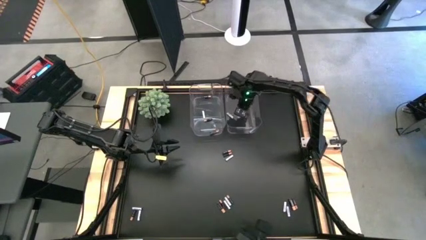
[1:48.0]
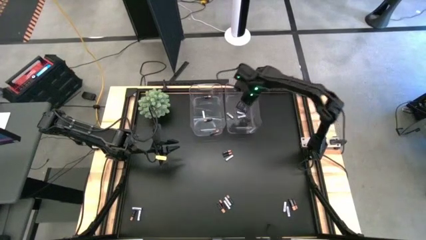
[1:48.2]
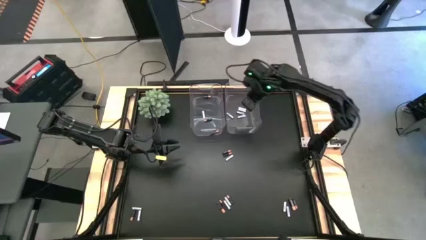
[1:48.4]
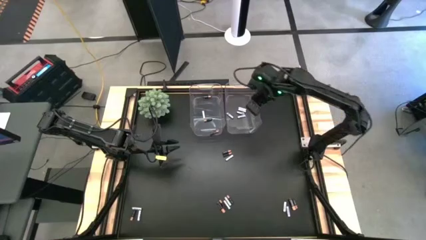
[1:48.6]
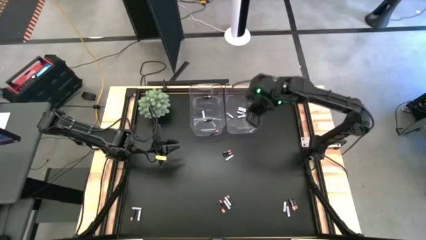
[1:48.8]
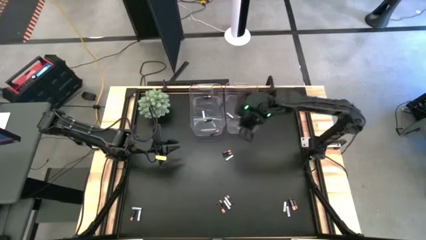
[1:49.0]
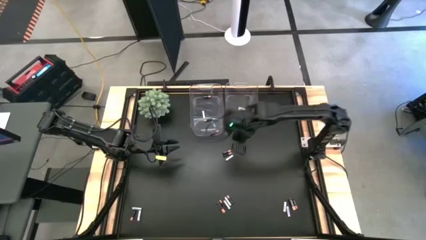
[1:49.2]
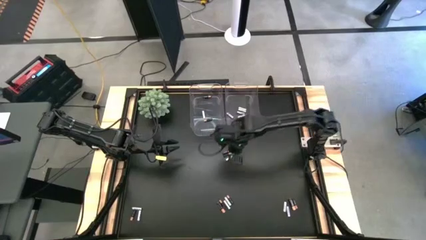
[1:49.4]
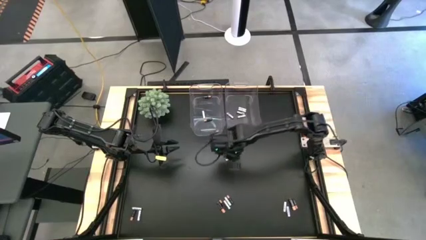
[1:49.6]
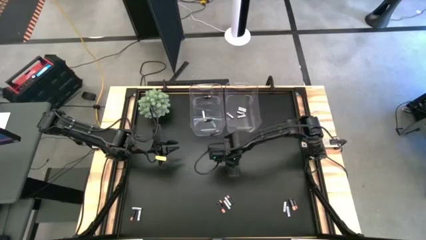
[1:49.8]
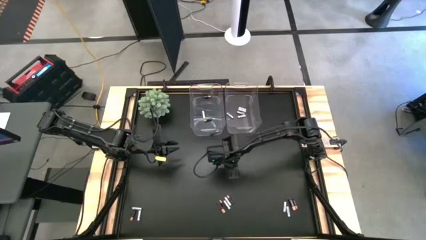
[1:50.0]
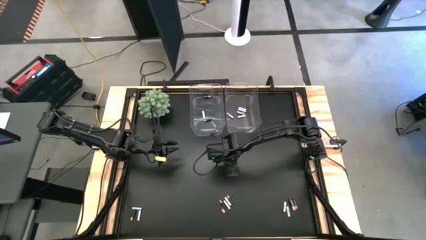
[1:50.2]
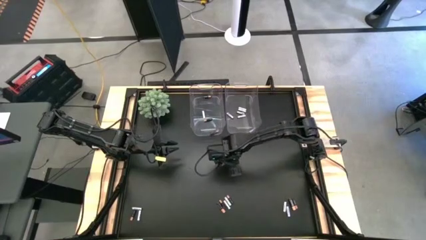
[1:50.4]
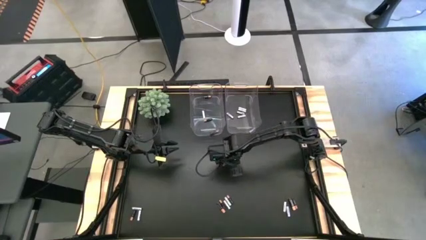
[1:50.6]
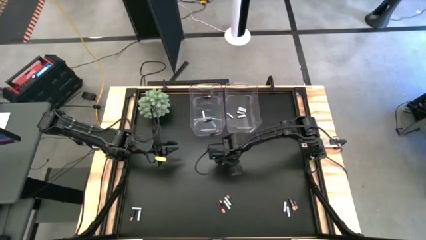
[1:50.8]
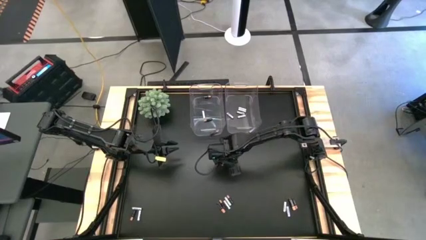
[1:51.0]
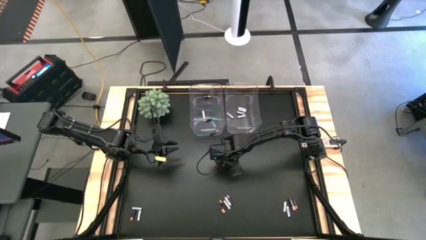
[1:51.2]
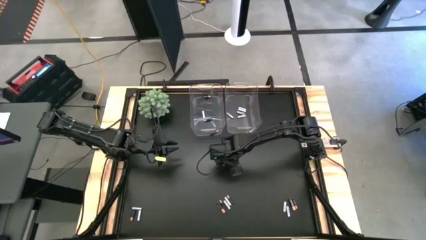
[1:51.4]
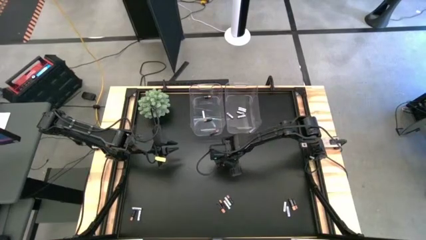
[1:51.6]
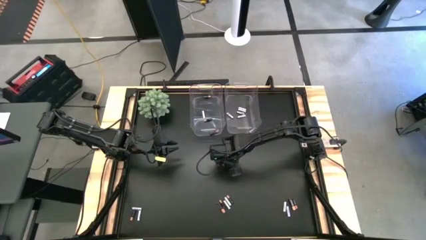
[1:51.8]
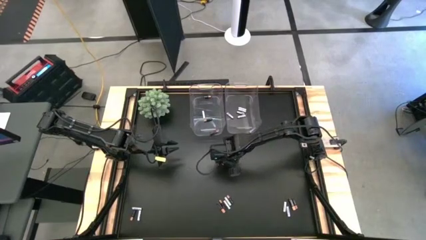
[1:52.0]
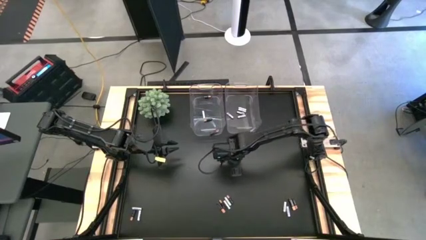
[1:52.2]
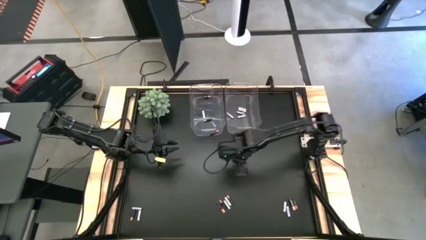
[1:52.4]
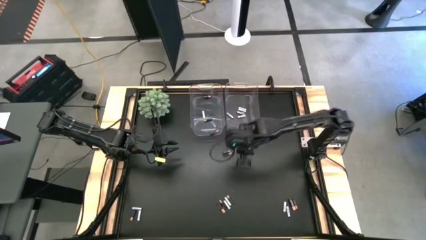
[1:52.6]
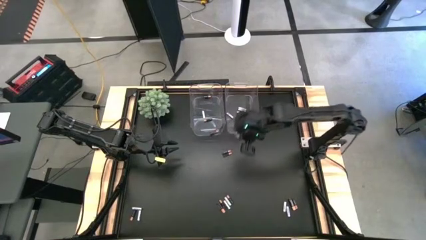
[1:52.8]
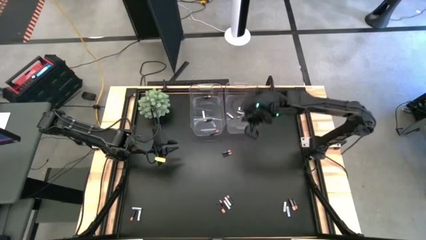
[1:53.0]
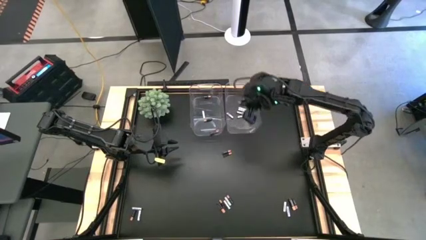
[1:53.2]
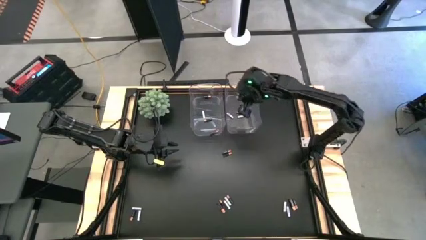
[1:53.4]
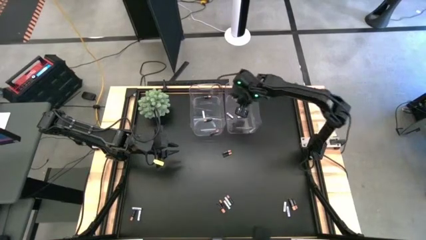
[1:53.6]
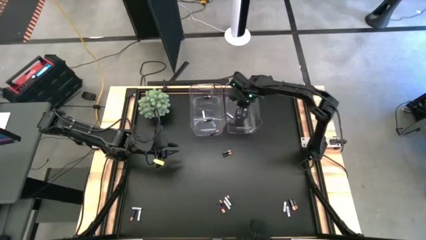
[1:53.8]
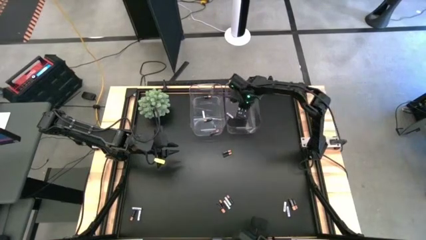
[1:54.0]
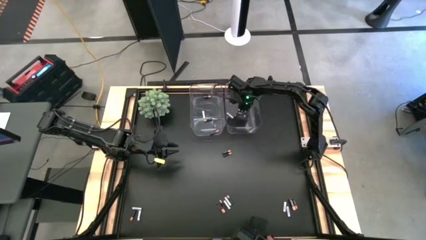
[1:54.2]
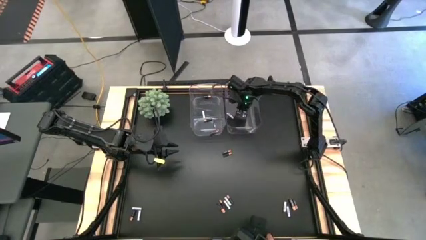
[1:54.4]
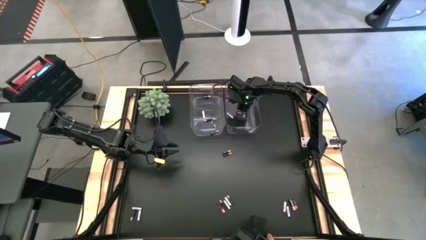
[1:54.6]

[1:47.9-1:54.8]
Task: Sort batteries
Put the white battery into the right transparent bin

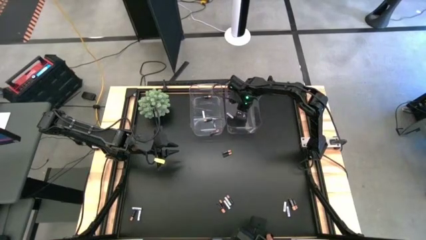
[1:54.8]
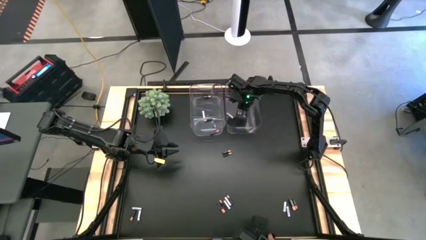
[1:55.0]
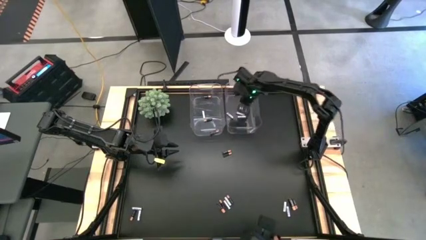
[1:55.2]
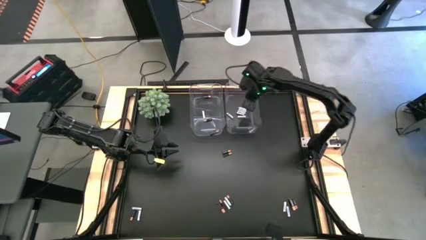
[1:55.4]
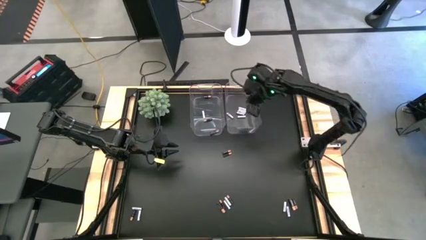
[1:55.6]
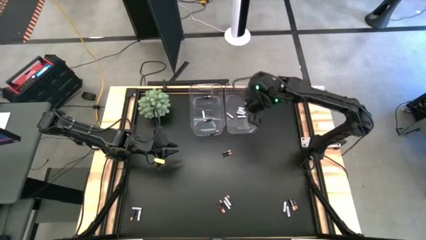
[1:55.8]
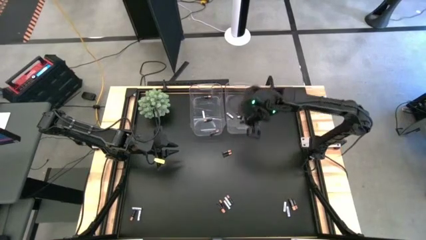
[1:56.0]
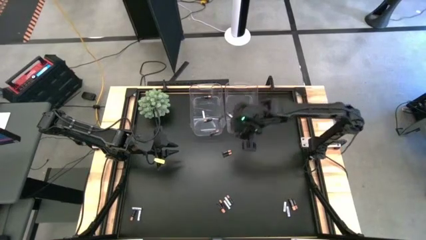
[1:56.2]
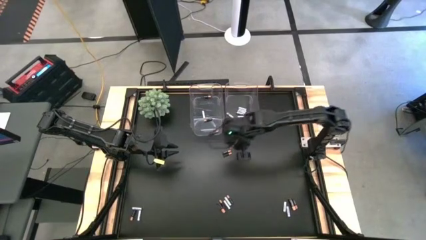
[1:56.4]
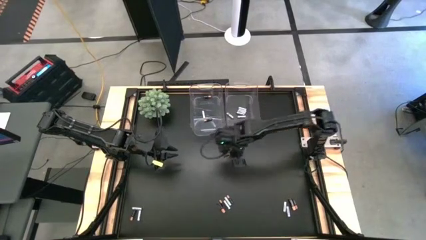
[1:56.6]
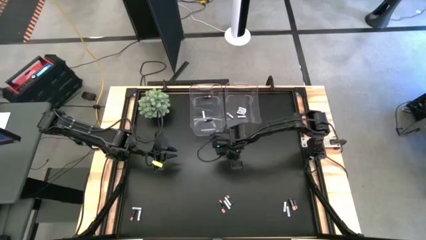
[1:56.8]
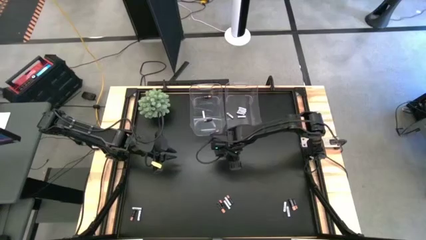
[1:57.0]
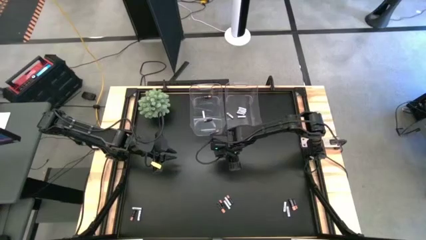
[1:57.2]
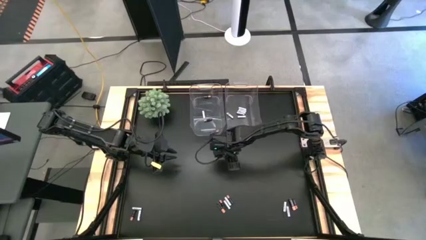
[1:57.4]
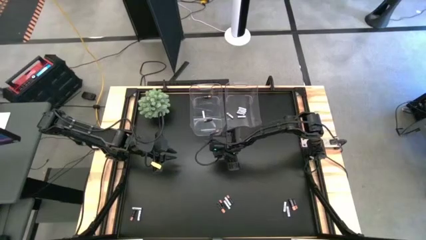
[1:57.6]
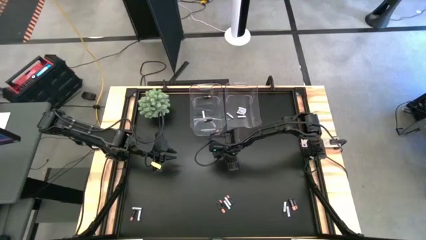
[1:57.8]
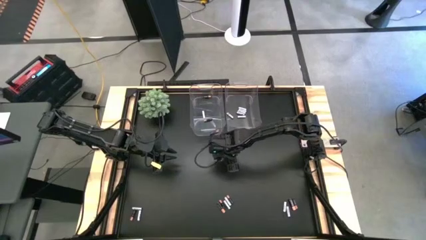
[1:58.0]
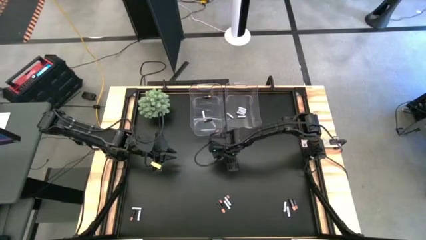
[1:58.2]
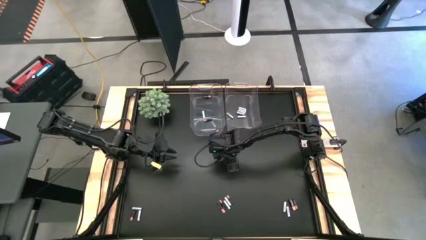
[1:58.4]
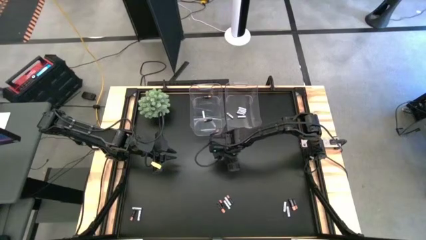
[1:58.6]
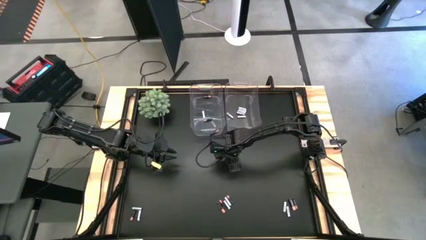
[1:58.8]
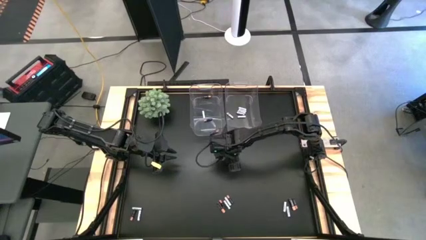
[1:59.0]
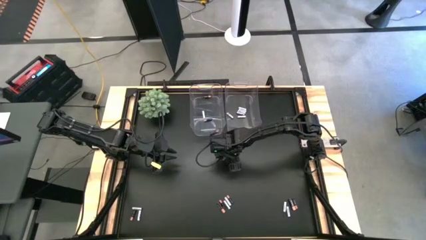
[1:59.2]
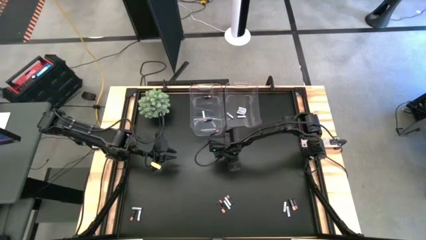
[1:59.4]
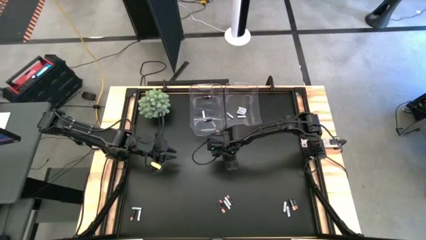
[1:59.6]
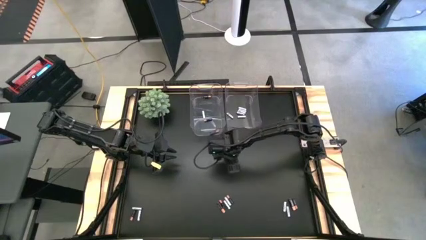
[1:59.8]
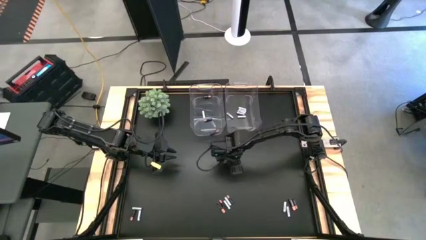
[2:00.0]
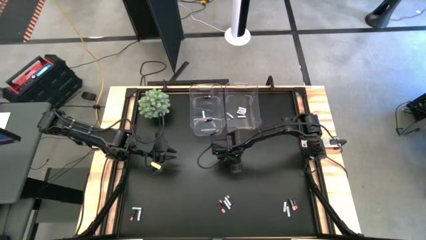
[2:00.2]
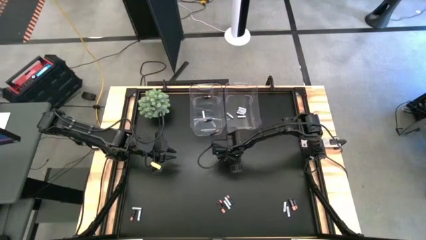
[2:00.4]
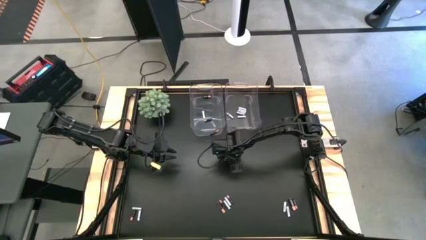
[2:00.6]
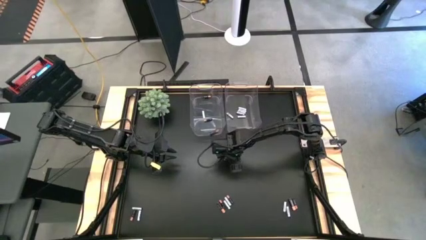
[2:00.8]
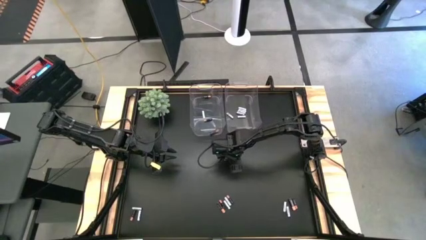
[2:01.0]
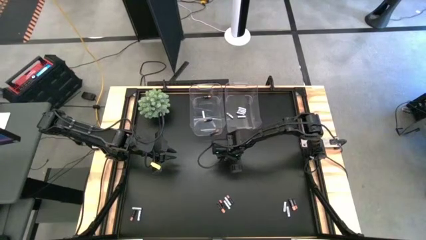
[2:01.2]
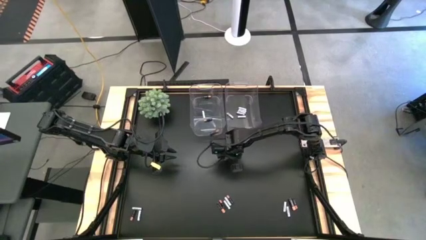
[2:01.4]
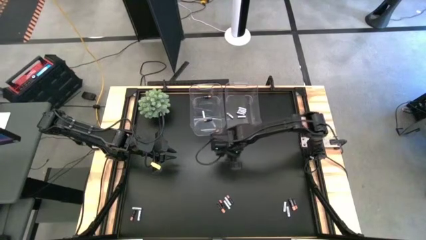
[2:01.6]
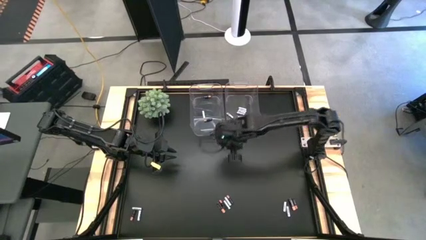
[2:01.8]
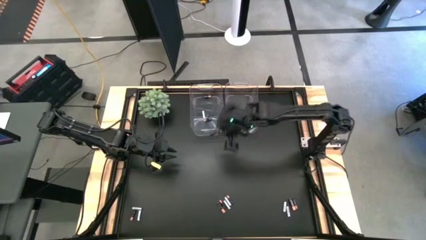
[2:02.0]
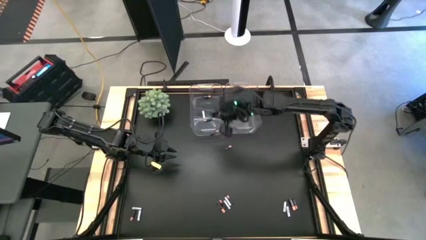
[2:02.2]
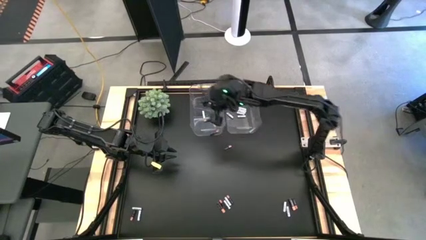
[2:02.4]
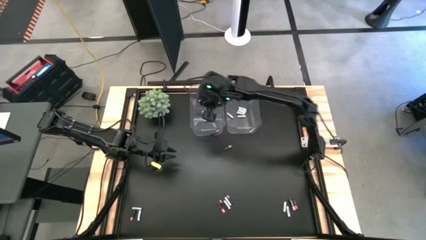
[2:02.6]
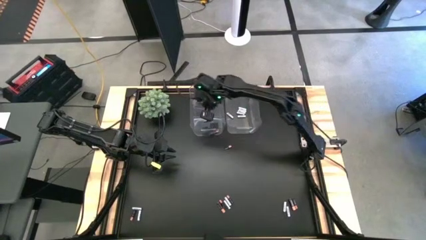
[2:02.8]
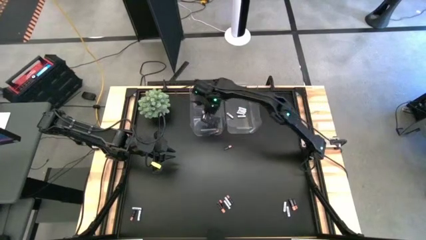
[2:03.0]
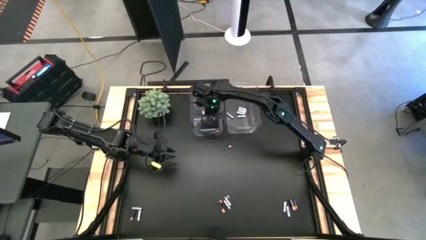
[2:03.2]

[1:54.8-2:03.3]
Put the small black battery into the left transparent bin

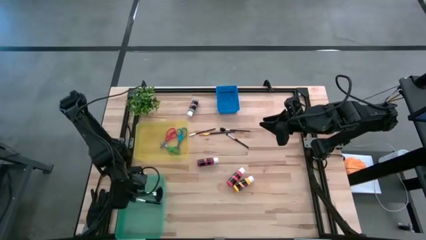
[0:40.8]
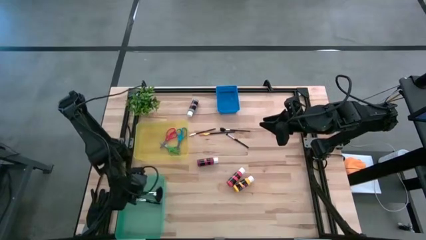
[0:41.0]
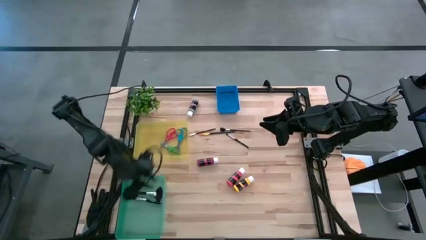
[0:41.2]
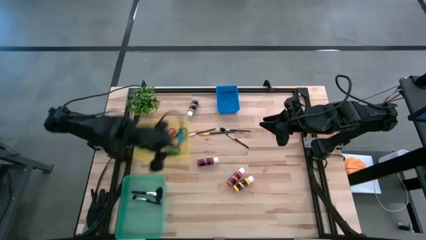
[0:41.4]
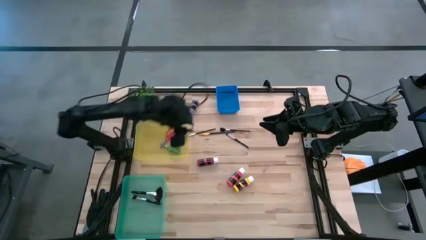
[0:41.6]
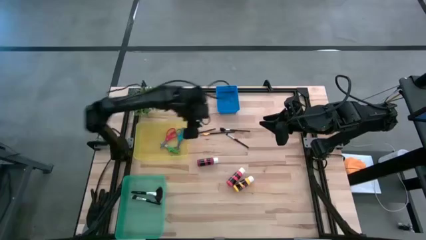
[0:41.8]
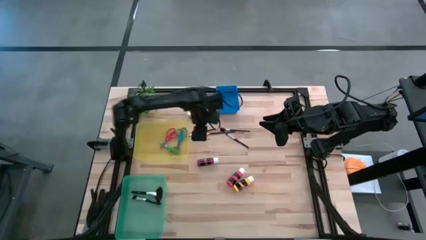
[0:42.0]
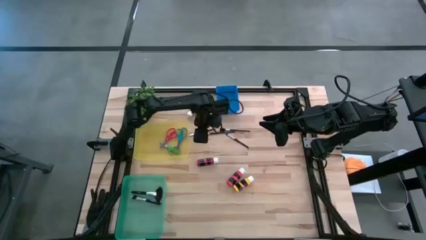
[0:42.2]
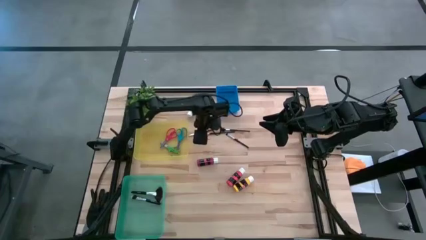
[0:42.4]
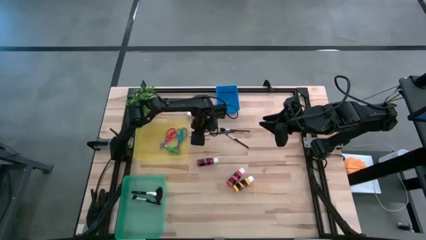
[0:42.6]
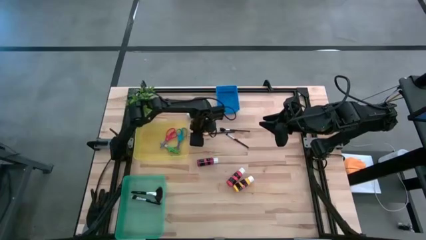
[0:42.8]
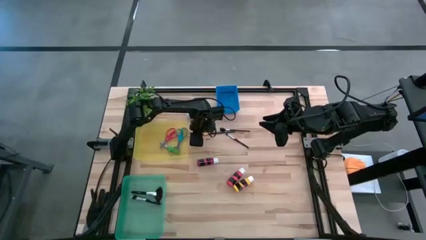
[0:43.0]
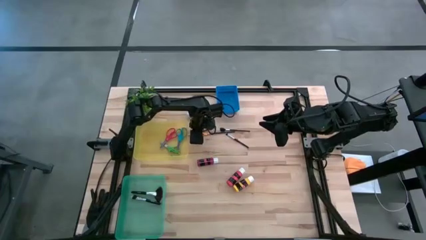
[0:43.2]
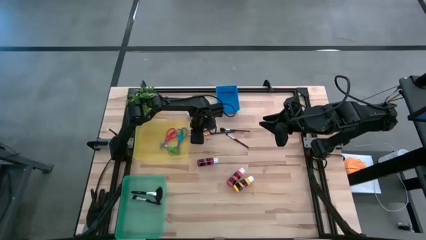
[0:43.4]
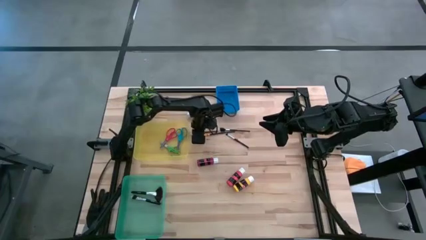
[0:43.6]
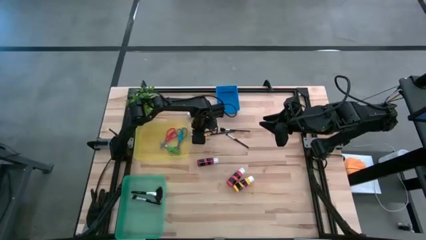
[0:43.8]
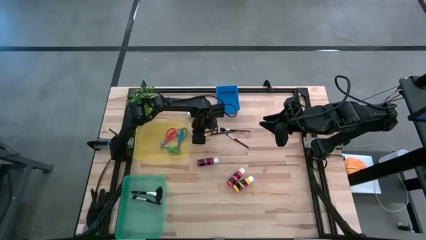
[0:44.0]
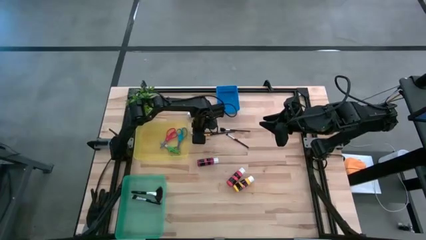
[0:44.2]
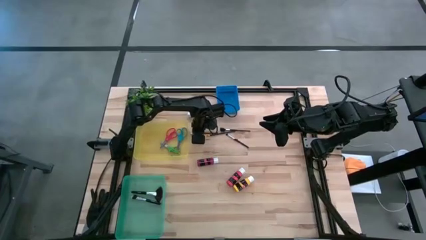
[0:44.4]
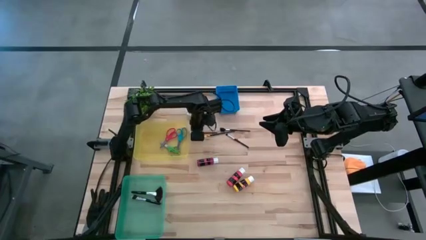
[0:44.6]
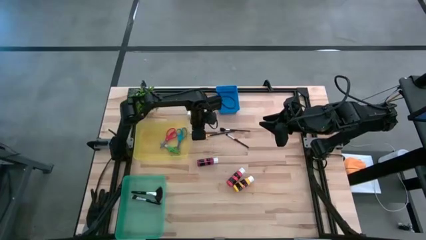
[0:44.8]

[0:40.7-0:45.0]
Task: Pick & Place Paint Supplies
Put the eyeshadow brush into the blue bin
